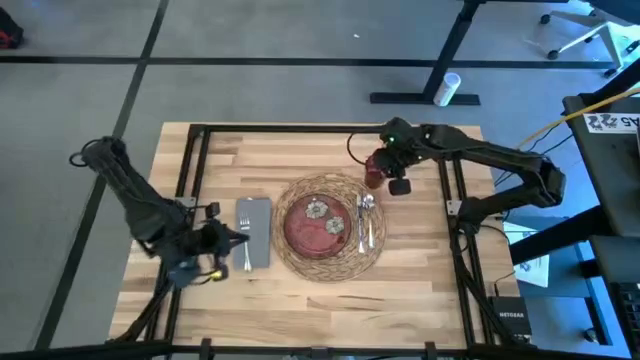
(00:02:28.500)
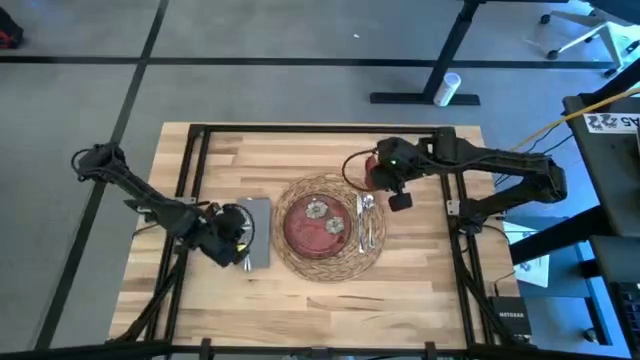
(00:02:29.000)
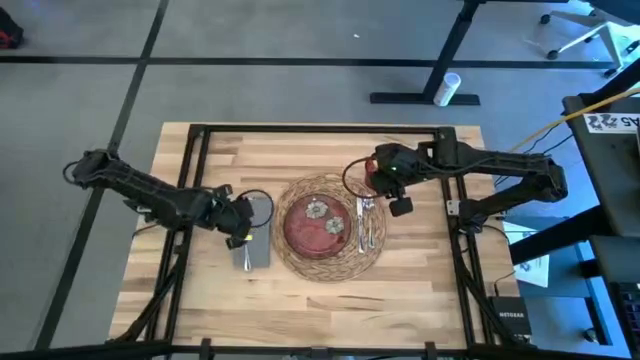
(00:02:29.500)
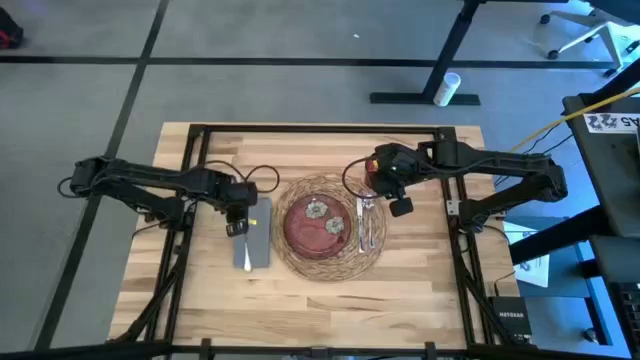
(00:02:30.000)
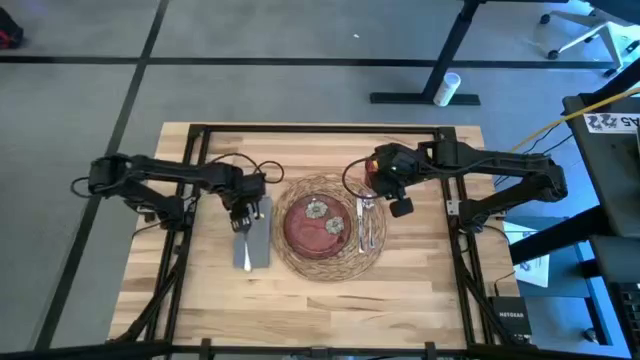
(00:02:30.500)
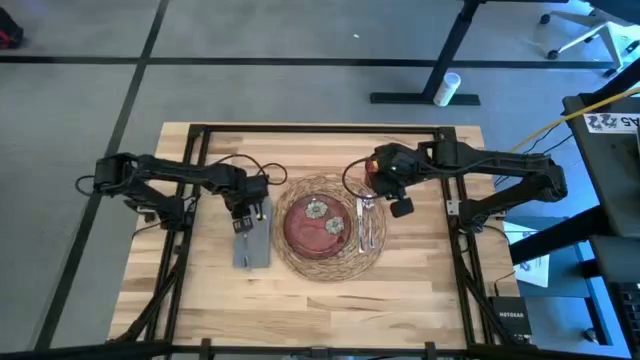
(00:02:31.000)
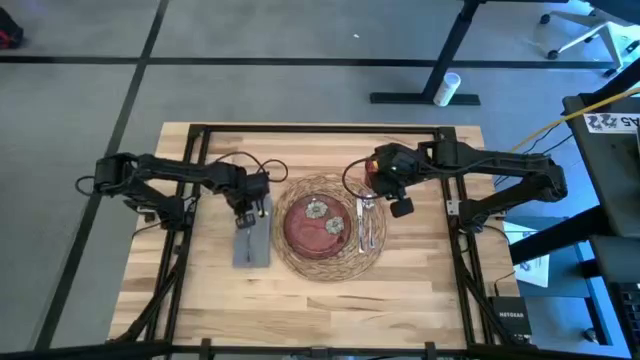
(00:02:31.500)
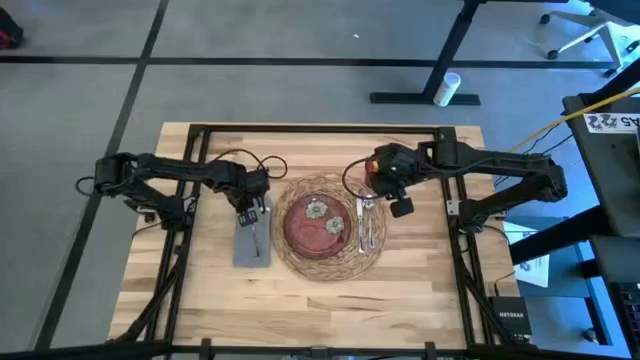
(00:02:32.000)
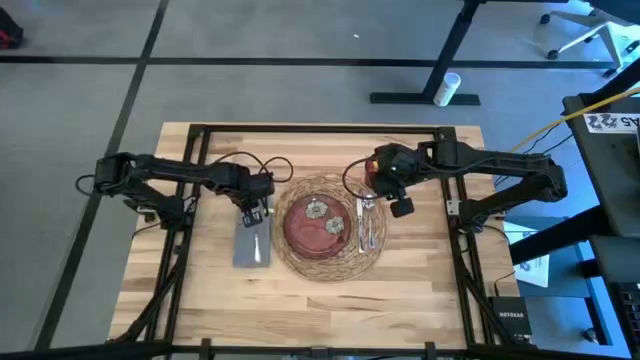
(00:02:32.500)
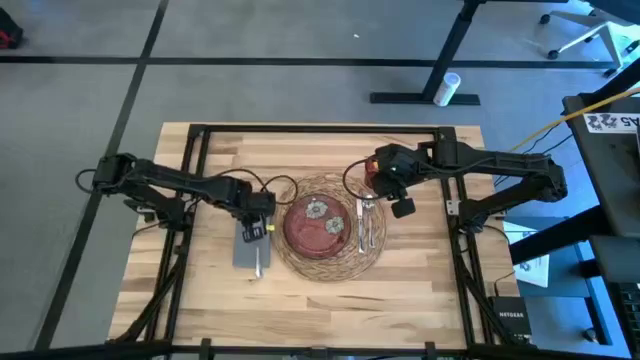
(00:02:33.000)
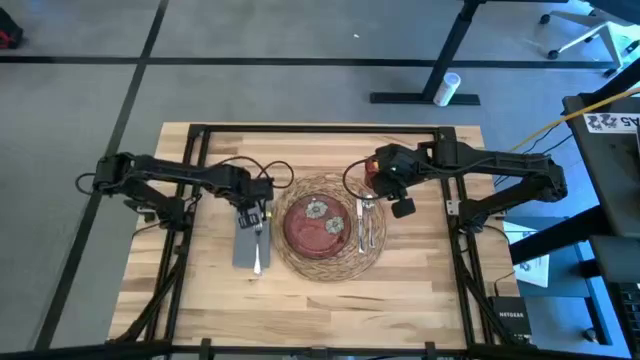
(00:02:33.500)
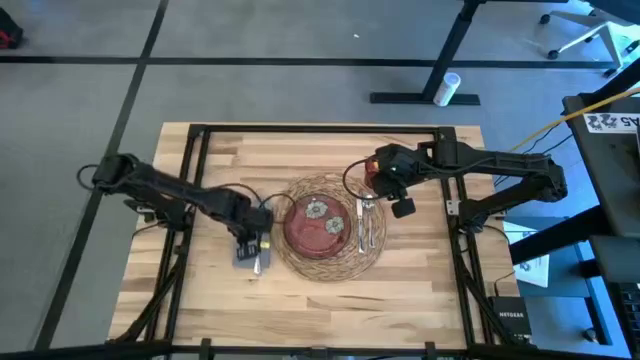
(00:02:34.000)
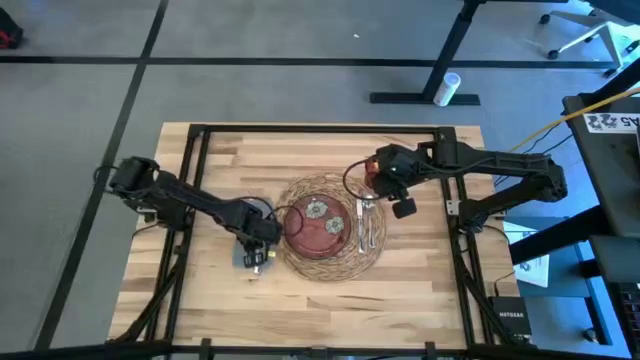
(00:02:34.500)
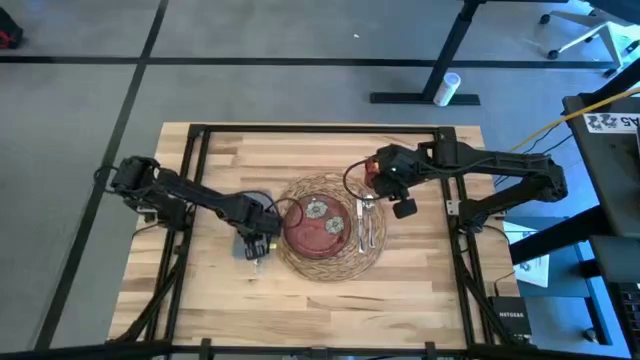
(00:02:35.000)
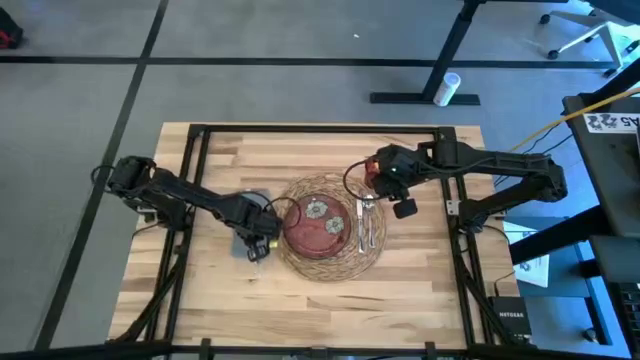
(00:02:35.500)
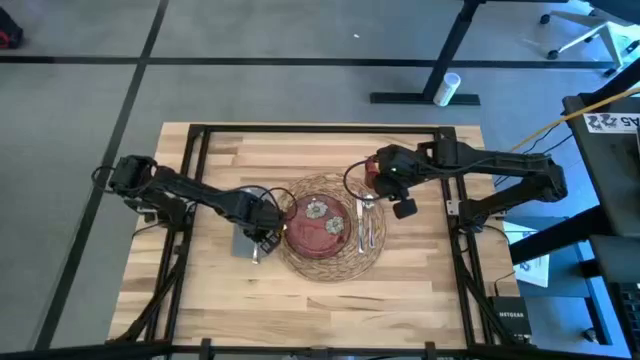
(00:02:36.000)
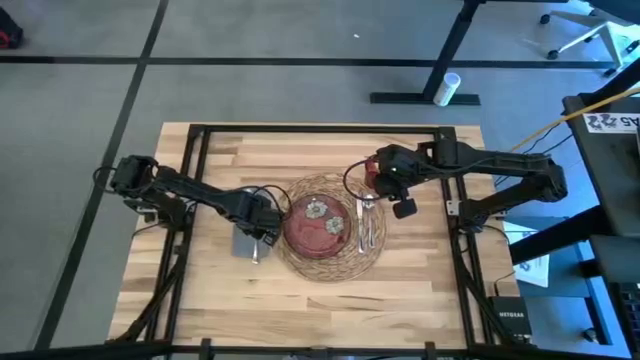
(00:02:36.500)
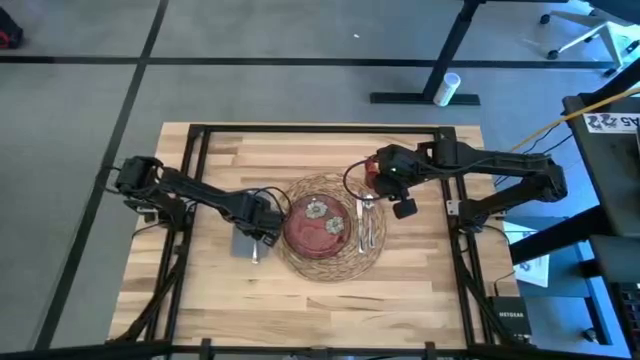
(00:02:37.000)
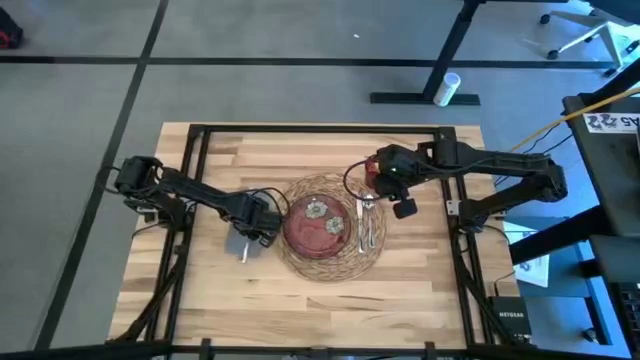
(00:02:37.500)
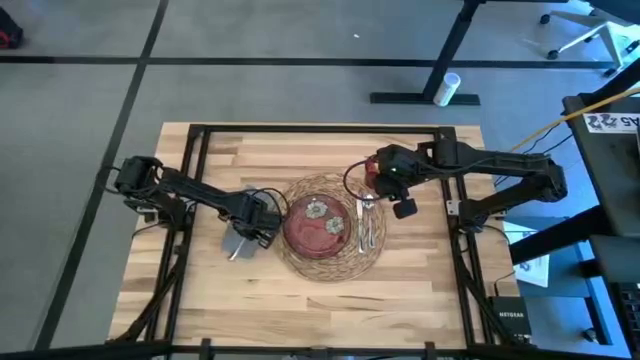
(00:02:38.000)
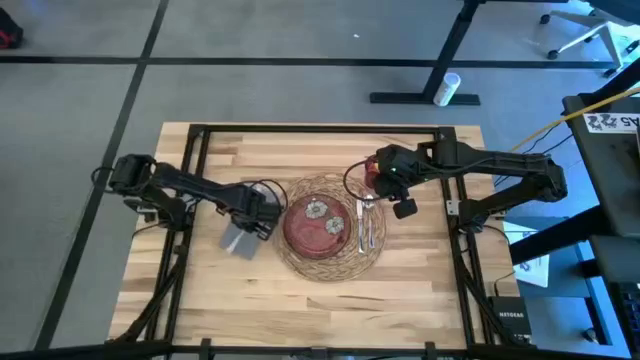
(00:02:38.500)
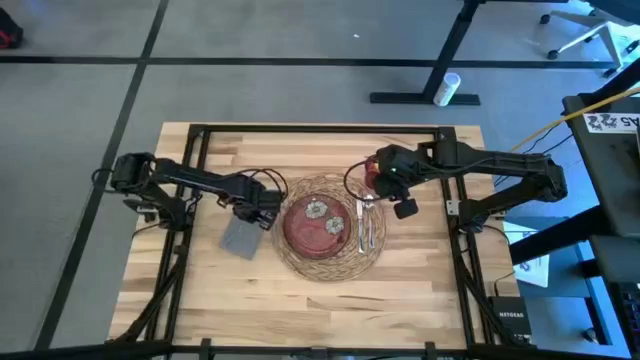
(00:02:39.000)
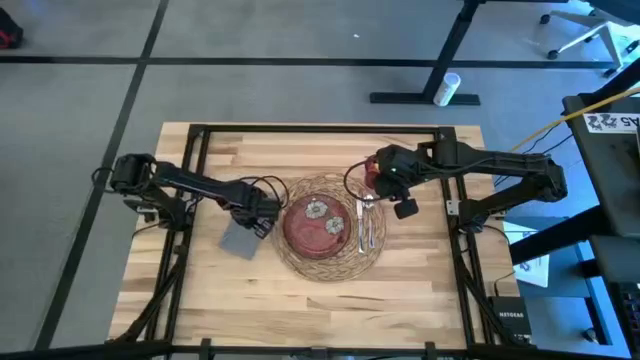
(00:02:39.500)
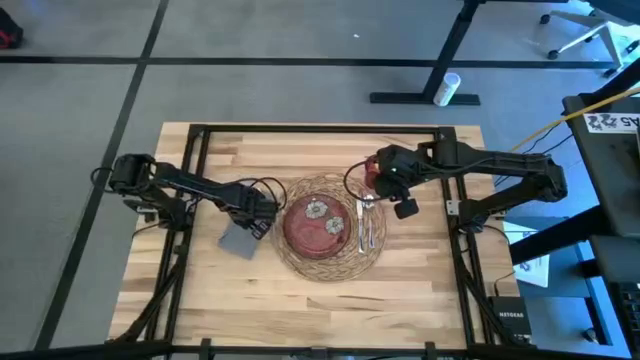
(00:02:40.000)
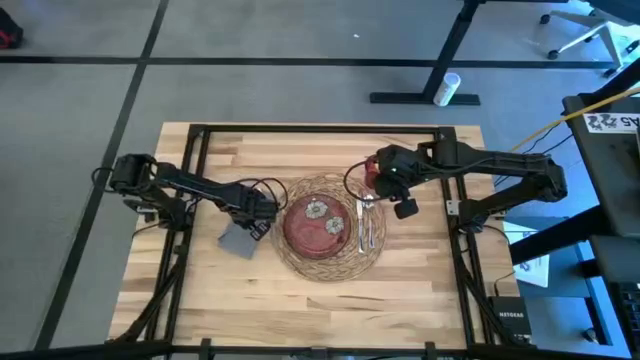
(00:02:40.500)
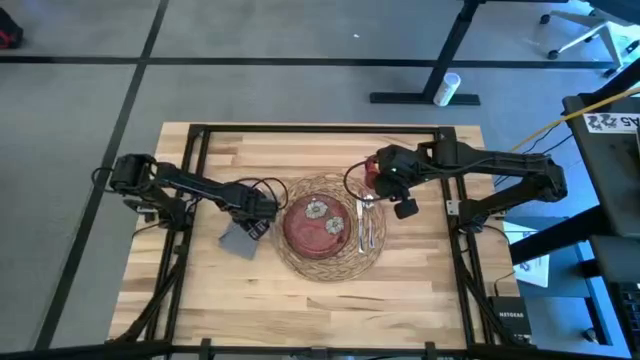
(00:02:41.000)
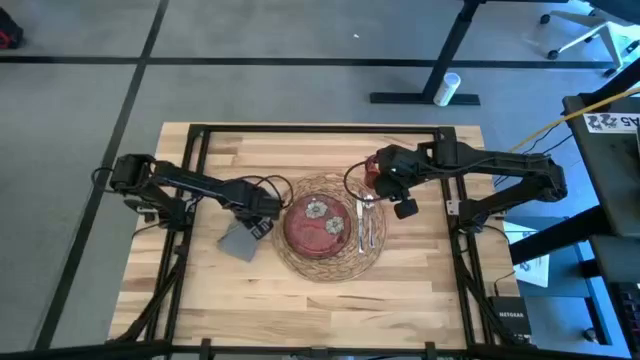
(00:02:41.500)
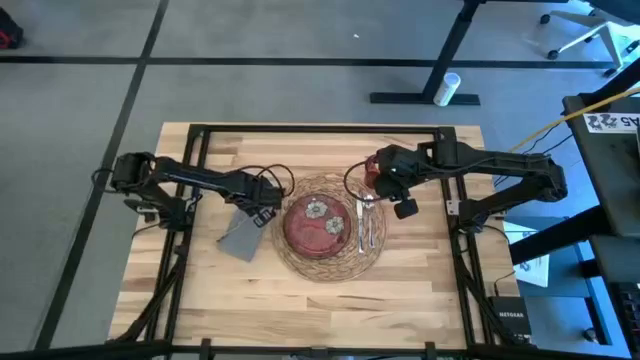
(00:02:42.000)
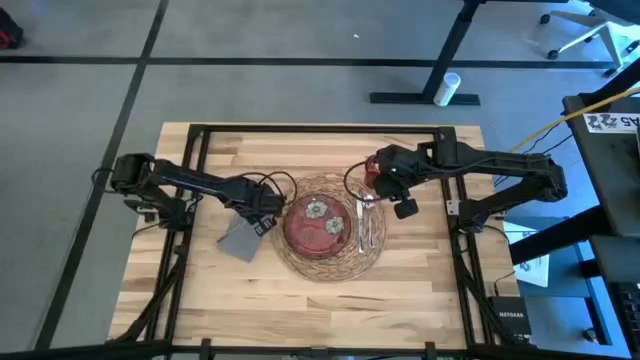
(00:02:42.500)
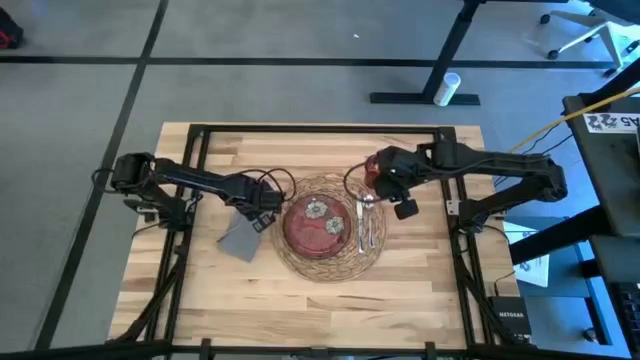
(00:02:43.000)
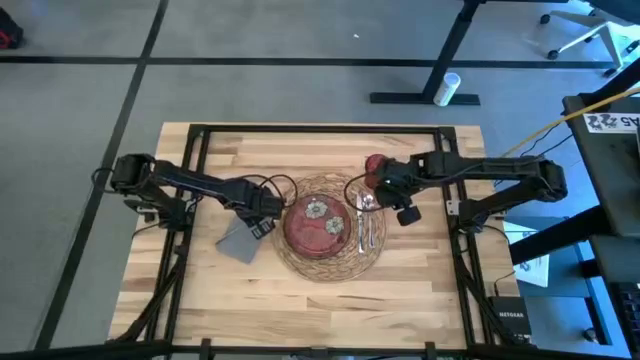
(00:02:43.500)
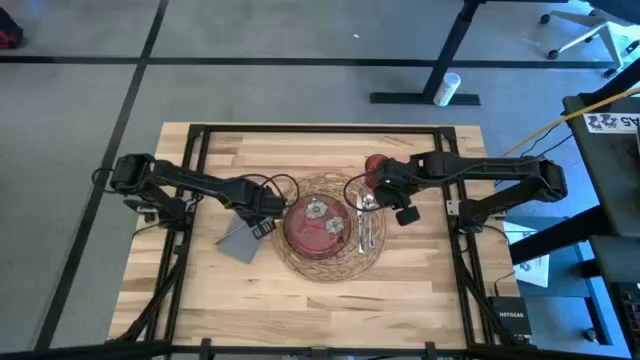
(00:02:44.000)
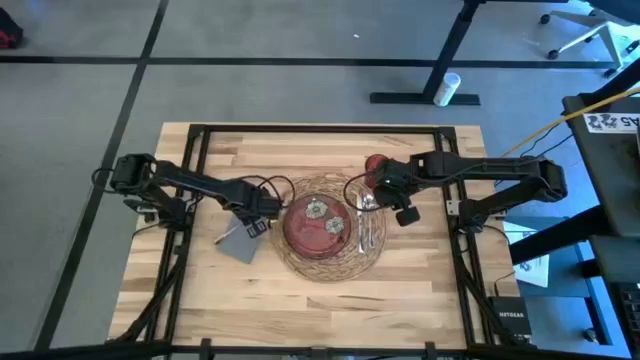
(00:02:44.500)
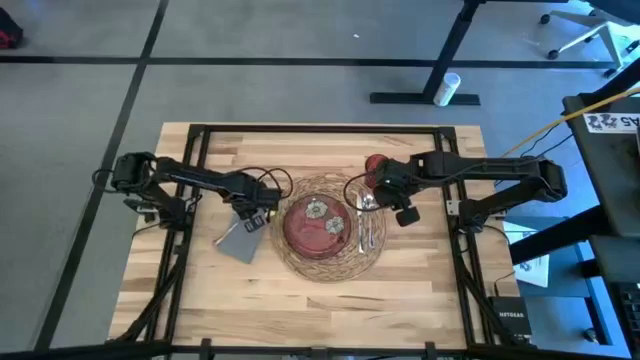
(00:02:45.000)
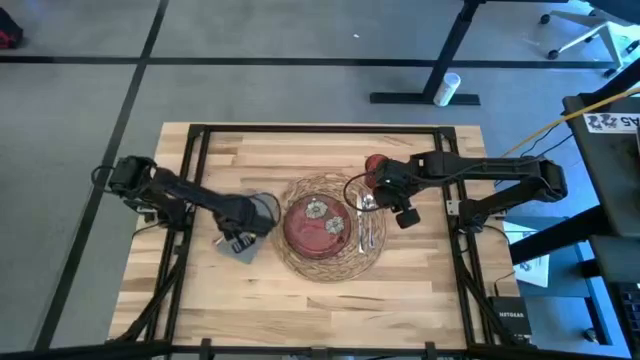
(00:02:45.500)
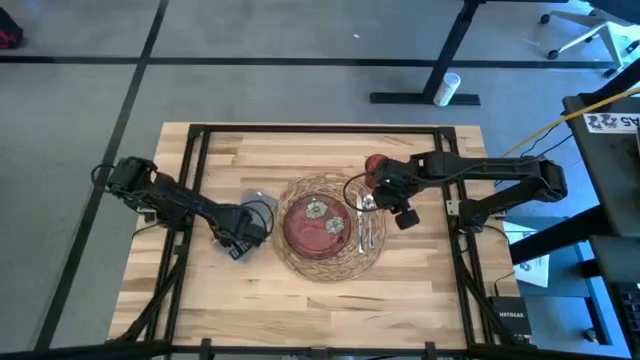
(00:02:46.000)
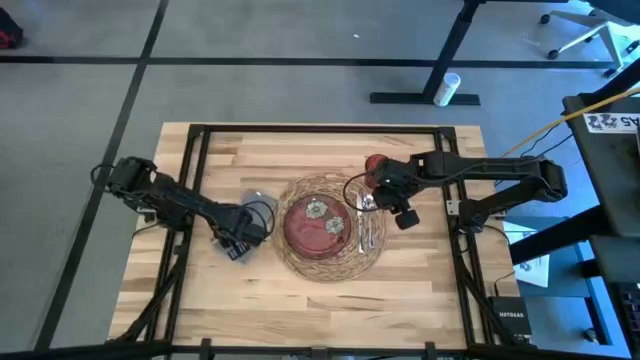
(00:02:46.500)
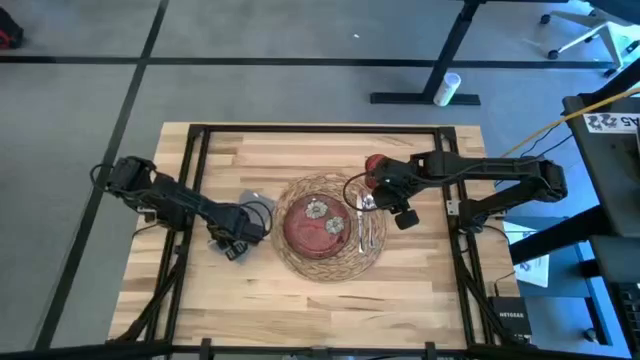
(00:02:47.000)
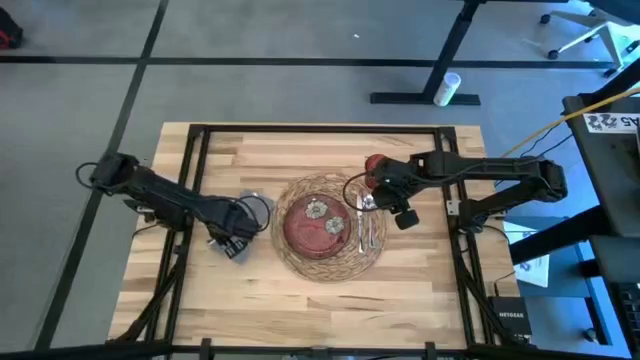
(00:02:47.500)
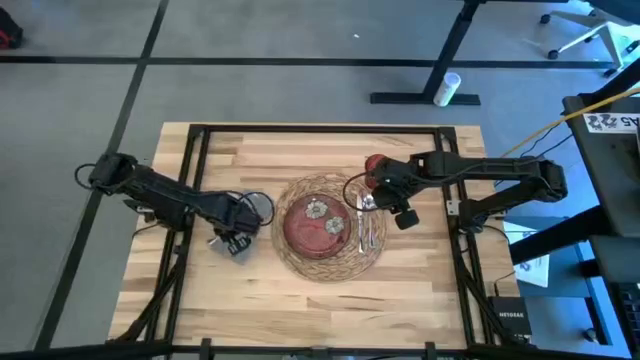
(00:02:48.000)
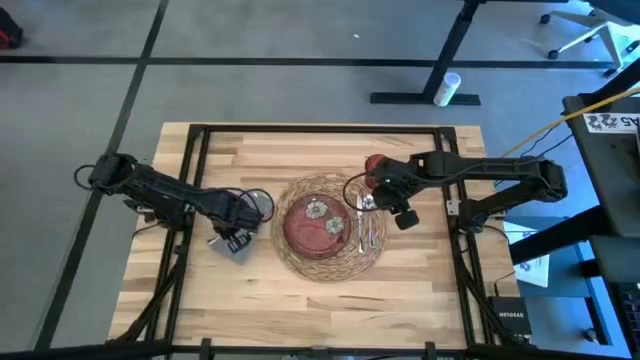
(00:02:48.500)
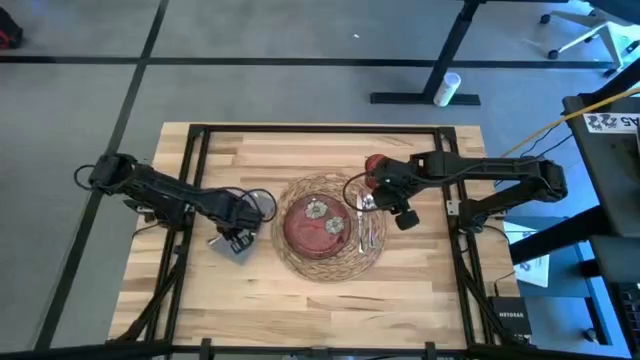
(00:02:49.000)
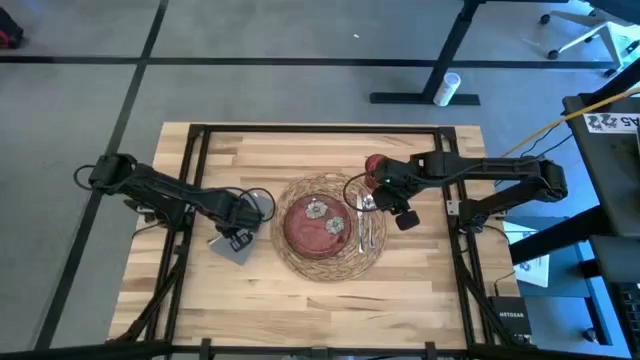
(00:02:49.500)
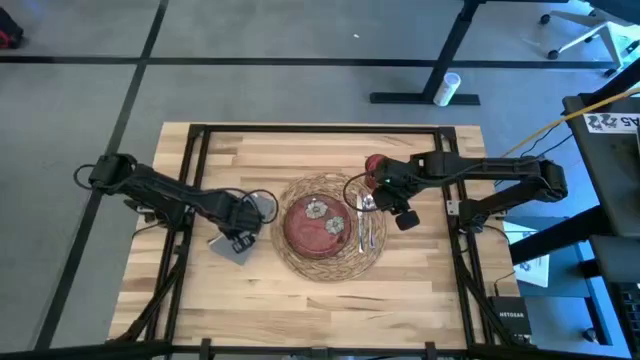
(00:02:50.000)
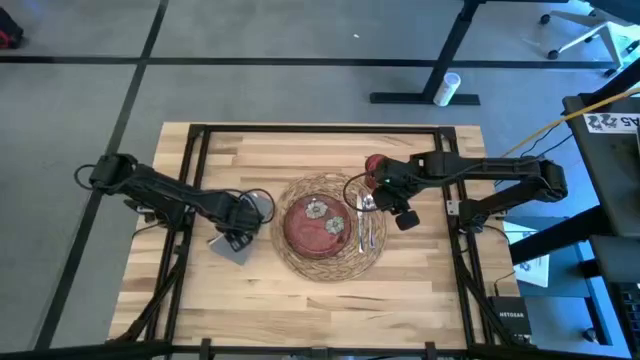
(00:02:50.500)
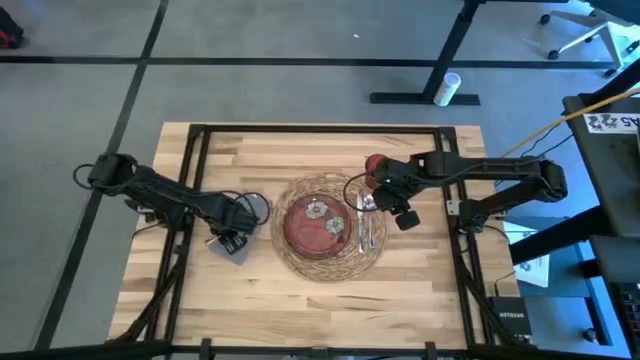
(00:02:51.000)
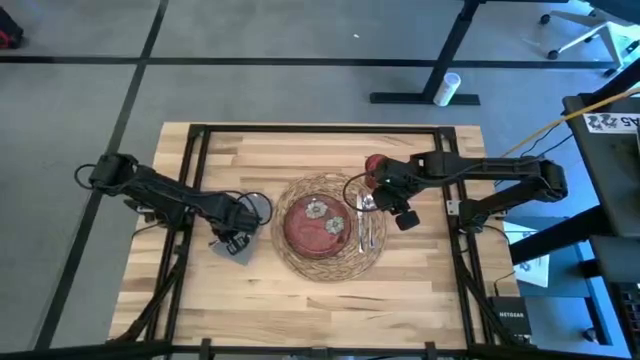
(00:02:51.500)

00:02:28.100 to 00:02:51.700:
Task: Set table place
Adjust the silver spoon on the gray table napkin
